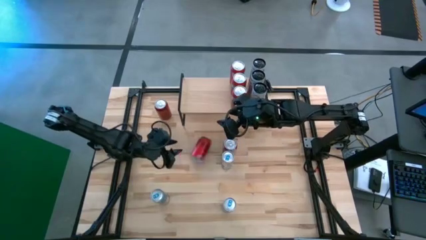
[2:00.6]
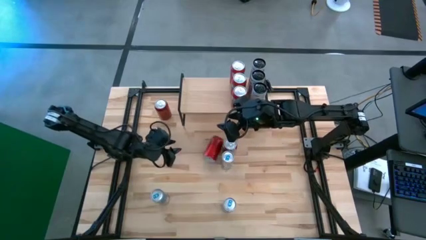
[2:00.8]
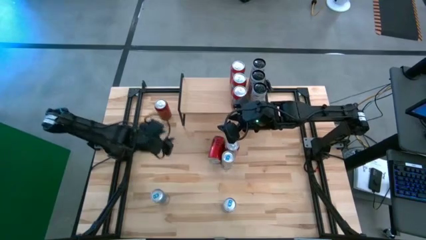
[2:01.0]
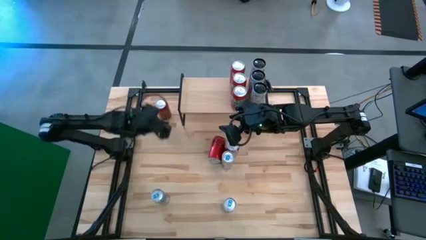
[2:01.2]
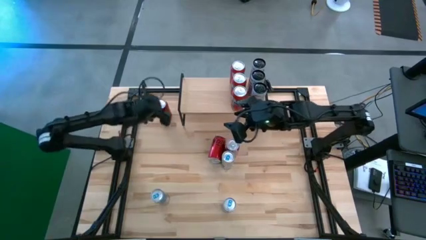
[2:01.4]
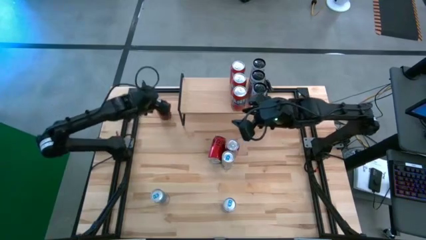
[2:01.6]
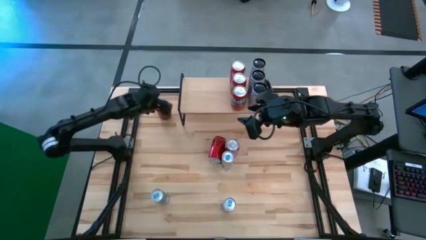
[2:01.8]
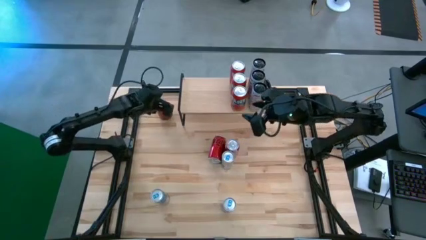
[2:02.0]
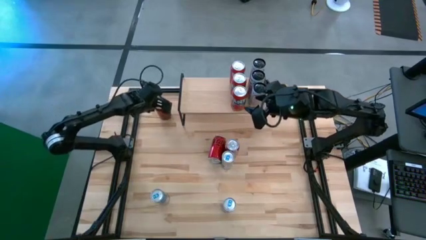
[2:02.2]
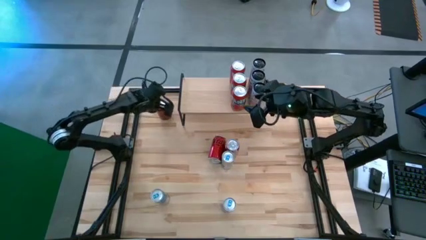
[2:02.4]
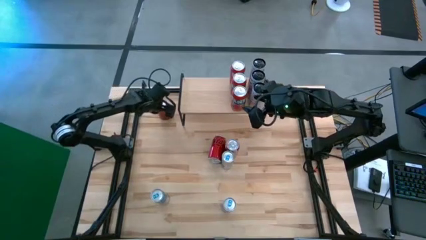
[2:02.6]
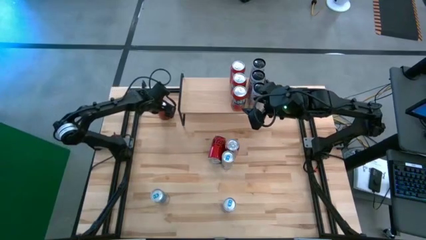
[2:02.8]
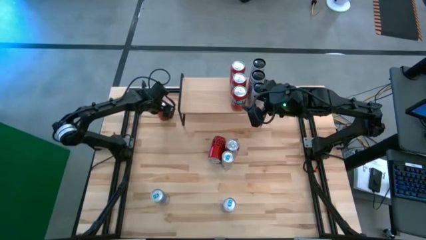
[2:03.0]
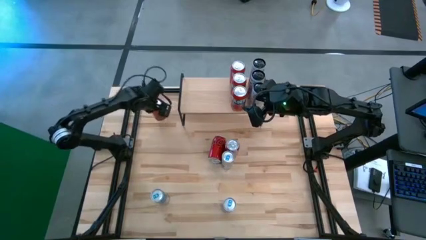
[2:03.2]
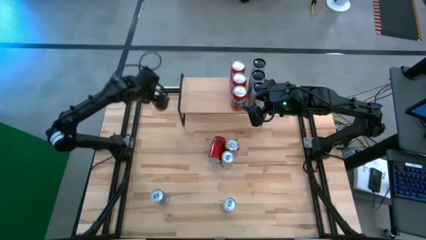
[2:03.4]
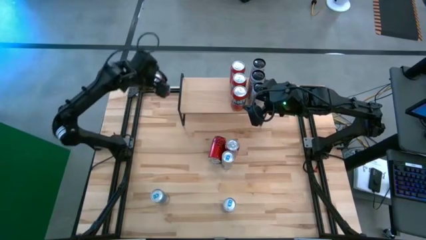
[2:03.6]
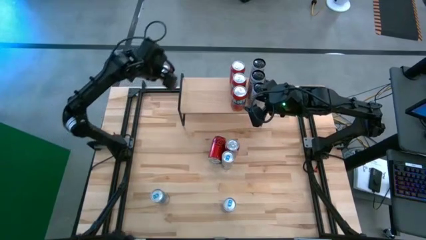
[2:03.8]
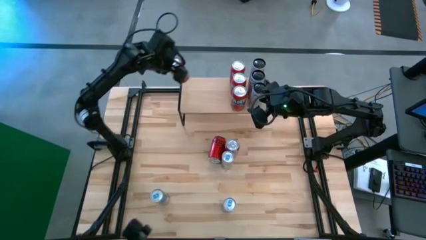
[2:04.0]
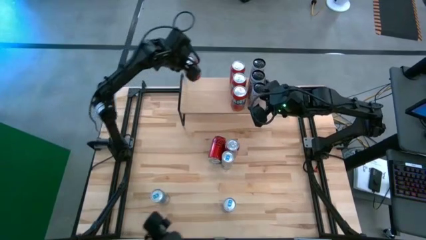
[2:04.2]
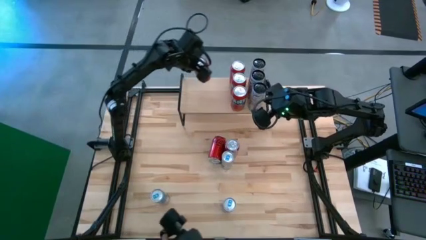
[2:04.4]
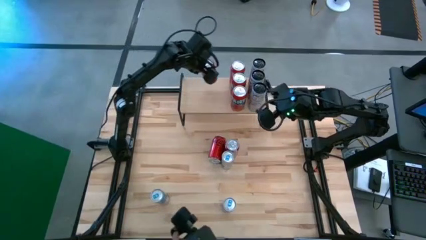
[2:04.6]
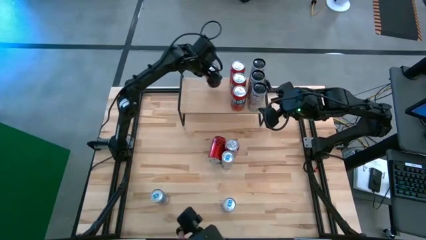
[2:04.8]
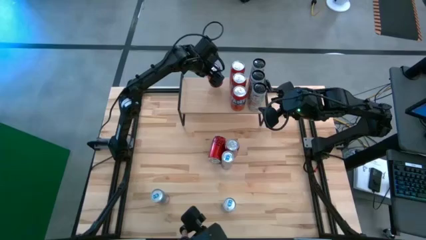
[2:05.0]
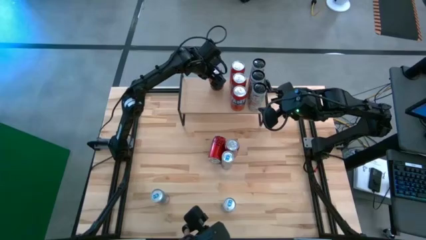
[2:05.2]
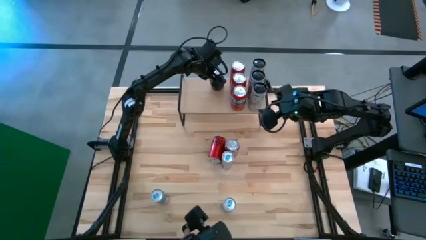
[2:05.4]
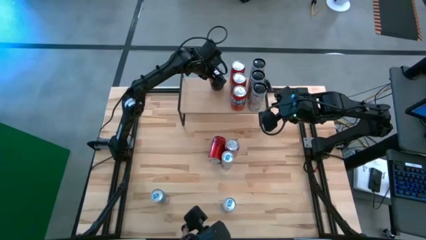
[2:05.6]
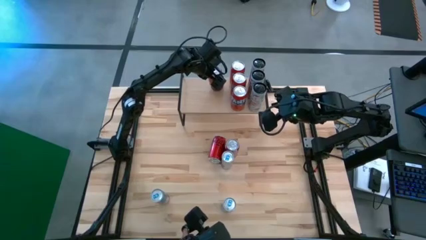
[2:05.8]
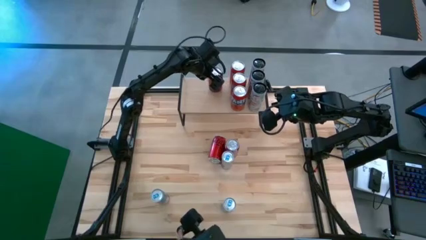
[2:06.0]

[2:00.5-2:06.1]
Task: Place canned beverage on shelf
Put the top red black soda can on the shelf

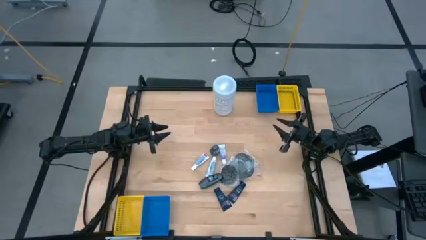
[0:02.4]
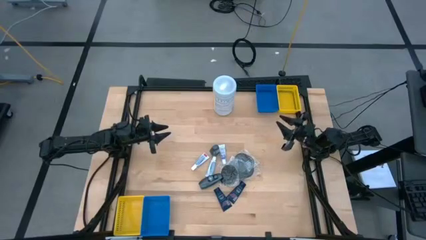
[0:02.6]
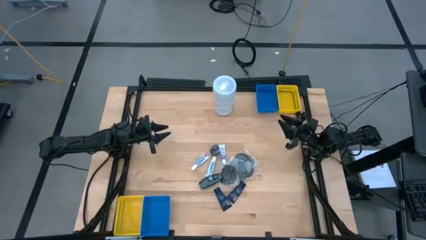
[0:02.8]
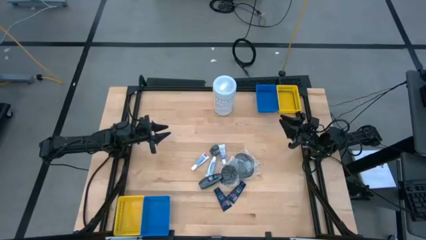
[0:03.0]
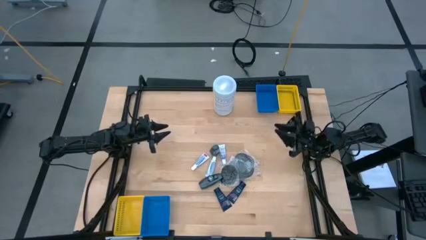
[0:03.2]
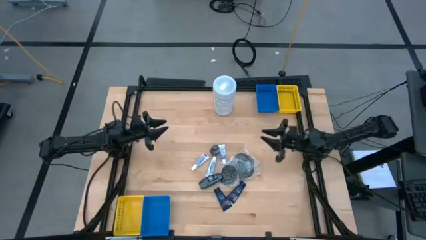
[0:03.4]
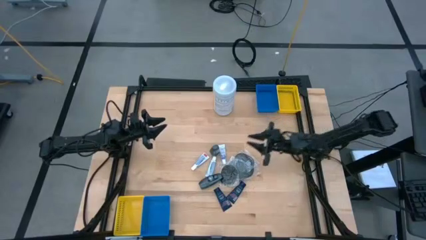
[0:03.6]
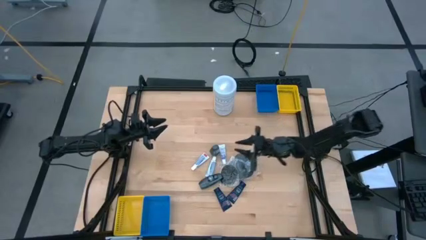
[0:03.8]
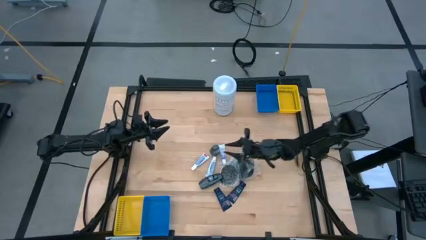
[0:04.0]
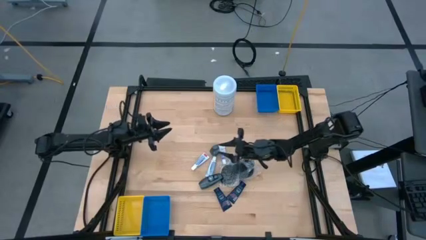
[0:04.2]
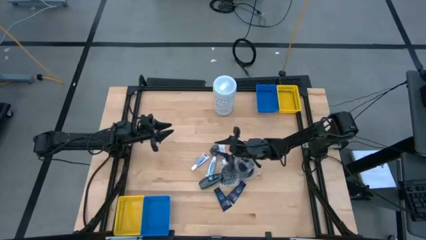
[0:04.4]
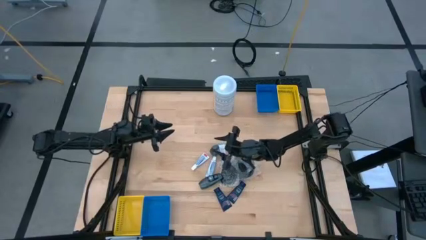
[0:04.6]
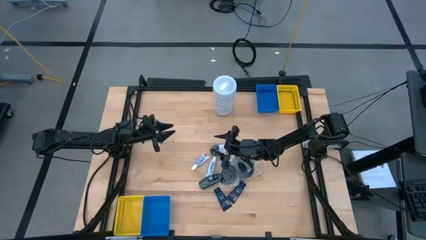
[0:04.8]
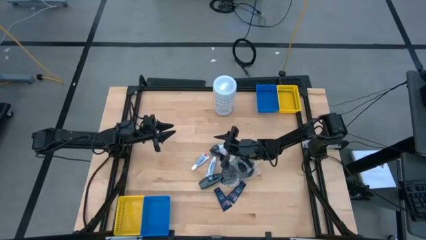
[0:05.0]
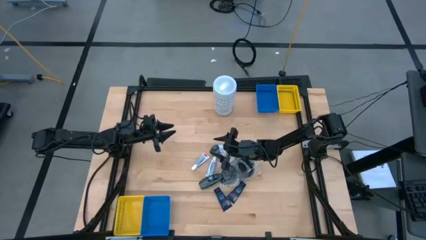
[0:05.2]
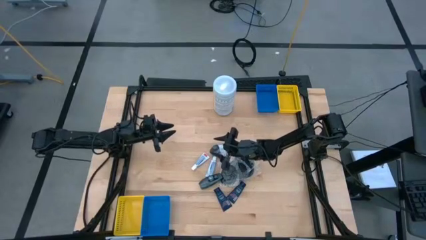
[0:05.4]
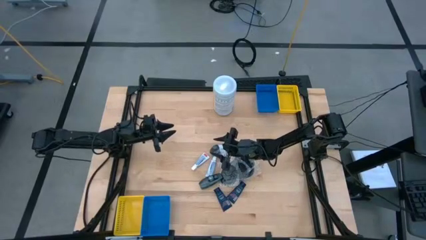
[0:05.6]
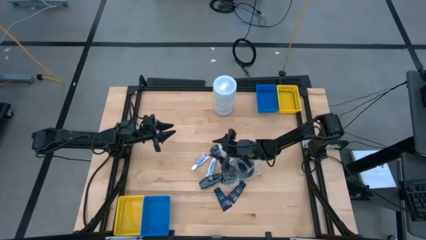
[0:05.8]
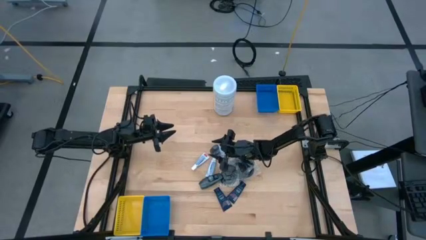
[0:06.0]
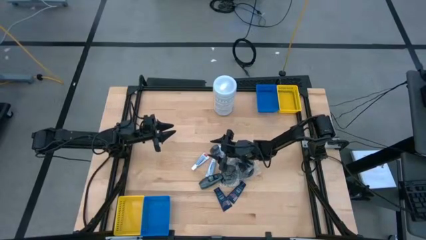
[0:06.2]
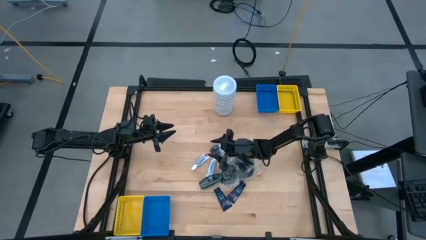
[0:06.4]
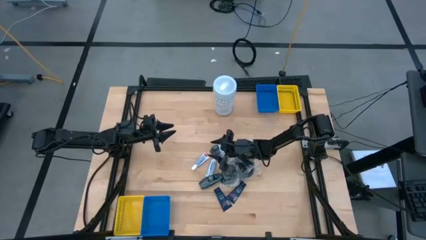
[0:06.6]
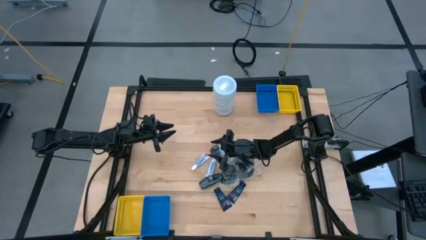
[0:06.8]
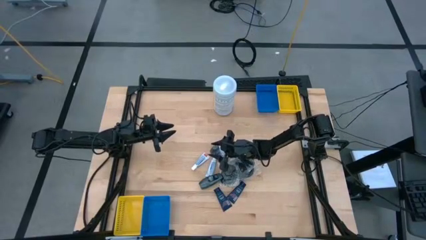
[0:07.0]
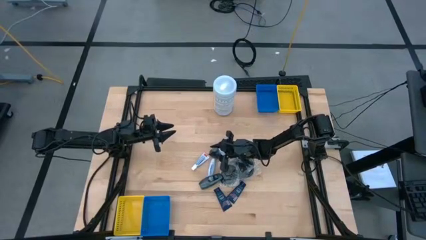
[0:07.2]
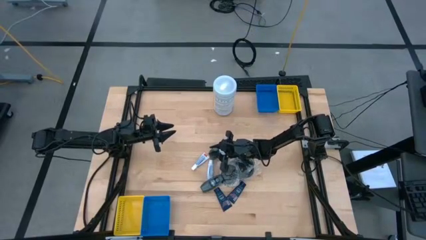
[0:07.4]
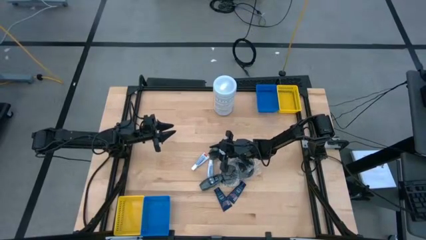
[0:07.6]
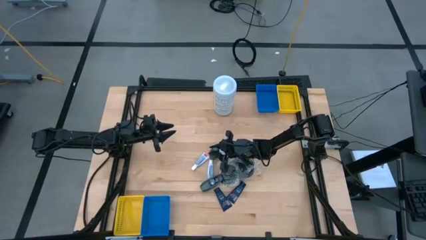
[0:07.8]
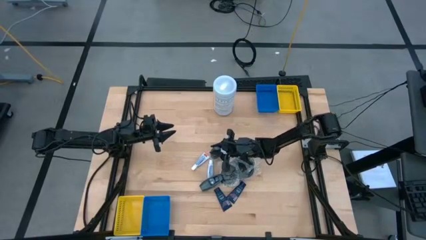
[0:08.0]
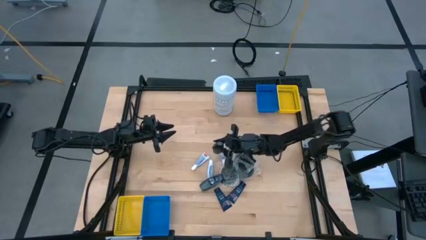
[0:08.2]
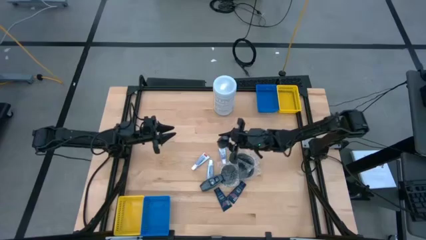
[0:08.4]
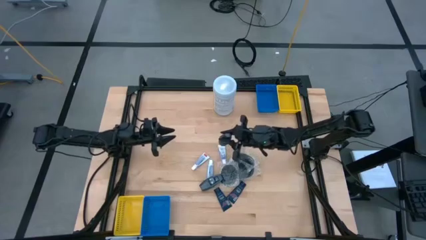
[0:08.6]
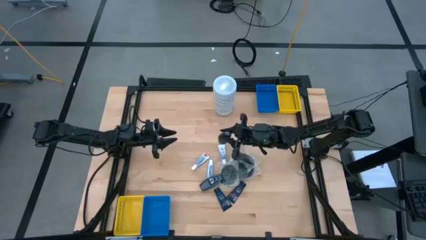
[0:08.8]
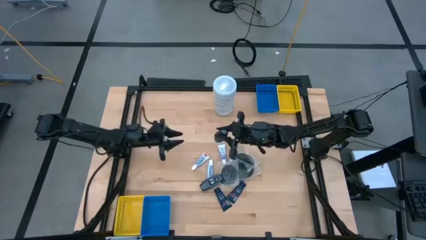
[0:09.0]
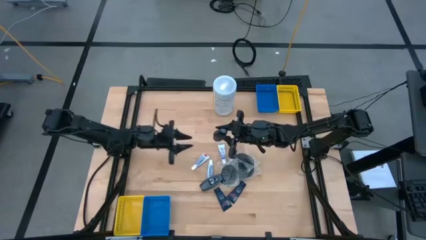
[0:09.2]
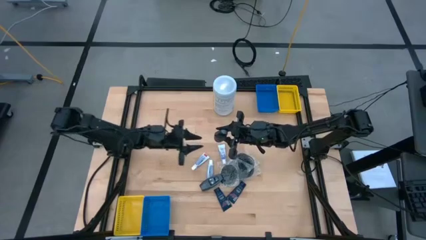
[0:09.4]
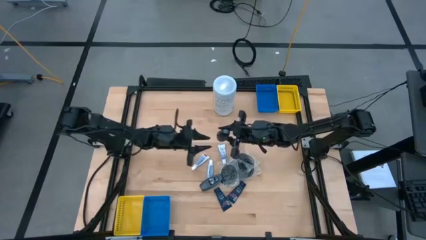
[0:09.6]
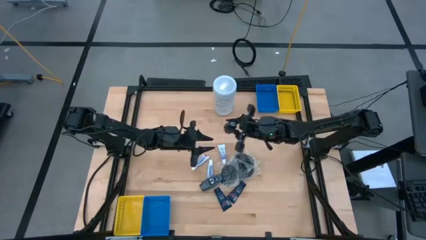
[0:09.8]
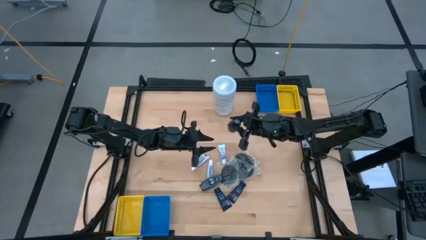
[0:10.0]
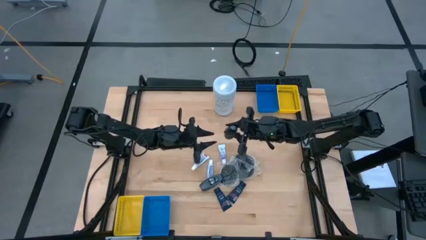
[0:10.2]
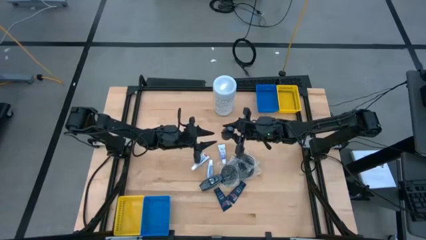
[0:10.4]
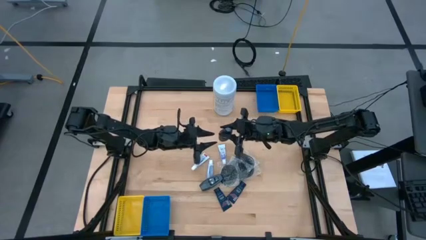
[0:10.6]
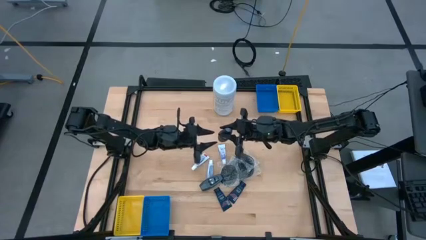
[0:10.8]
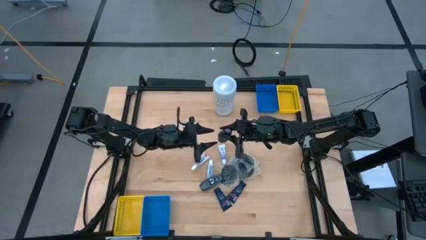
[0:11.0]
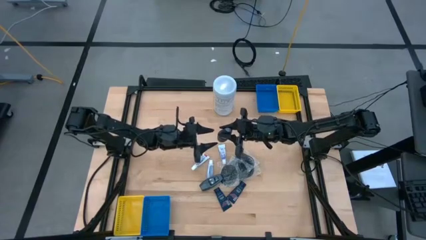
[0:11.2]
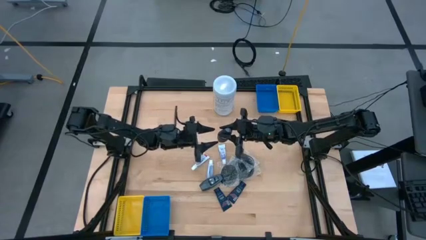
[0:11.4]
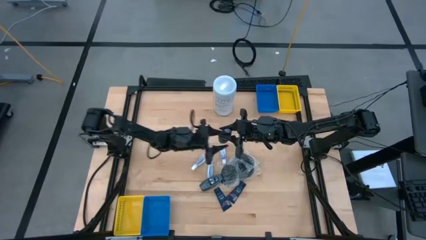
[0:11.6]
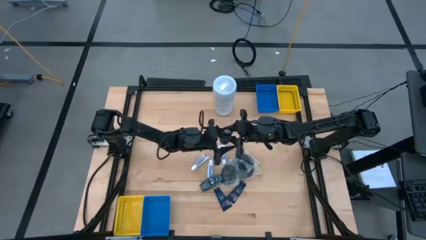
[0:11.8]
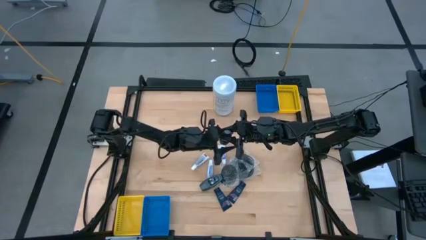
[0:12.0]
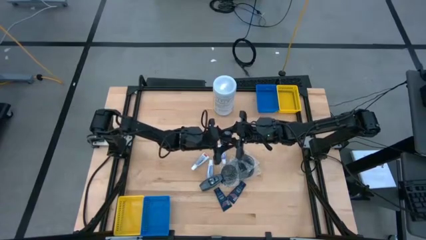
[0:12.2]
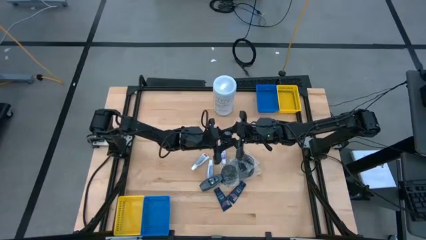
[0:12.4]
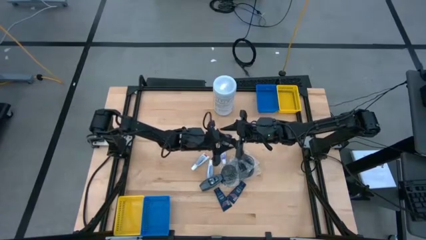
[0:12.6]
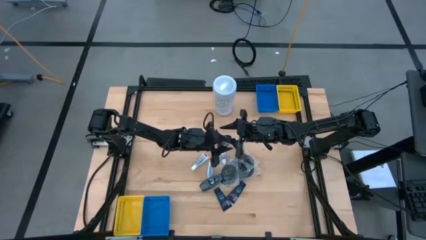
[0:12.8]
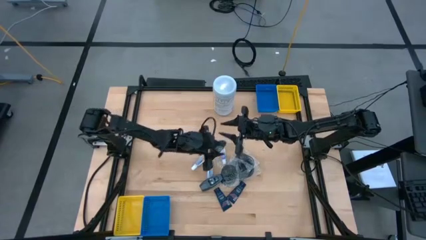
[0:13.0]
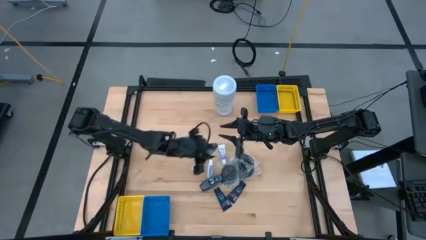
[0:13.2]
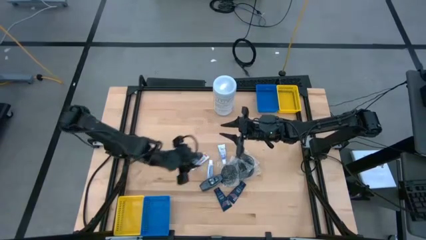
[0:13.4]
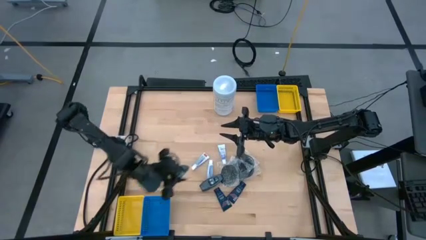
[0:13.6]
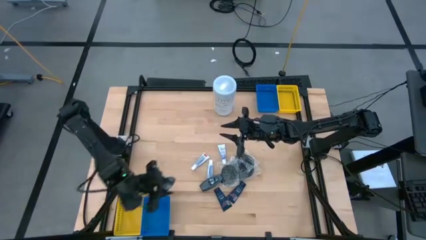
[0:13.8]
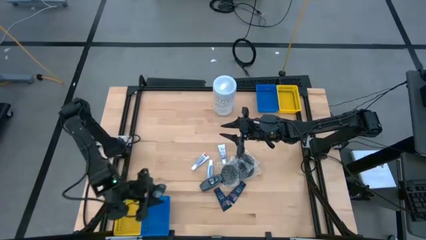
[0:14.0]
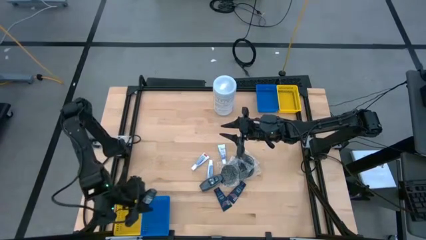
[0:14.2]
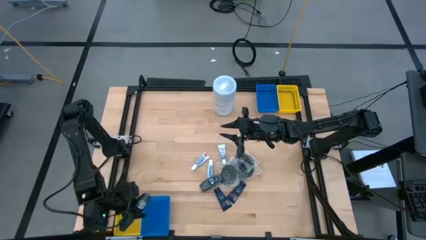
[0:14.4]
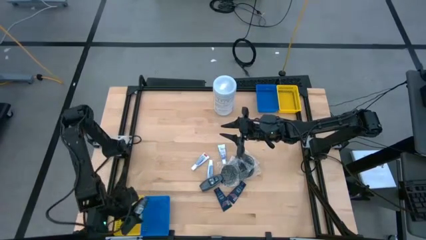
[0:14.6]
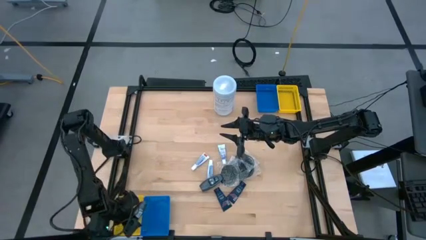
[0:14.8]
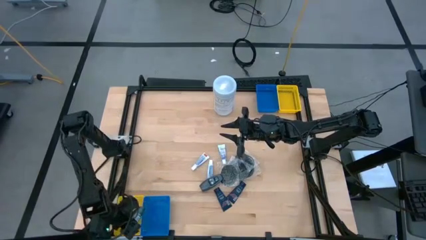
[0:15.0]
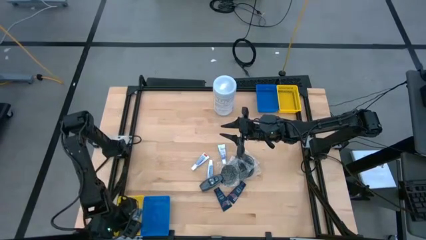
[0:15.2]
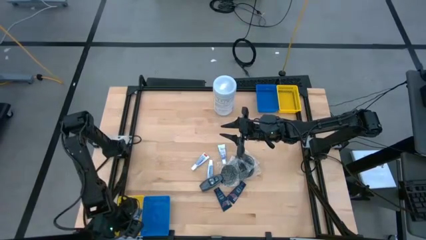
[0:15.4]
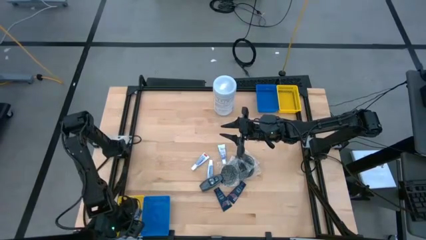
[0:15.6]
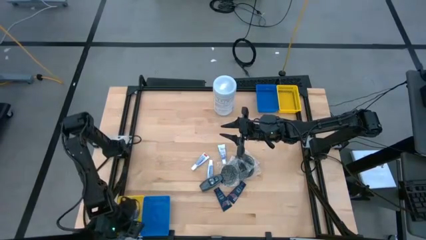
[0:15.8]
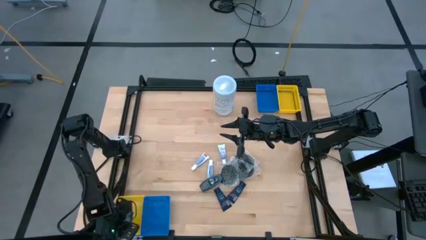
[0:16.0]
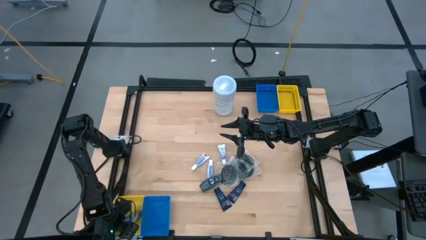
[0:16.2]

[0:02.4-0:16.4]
Task: Pick & Place Travel size toiletries
Put the gray deodorant into the bottom yellow bin
